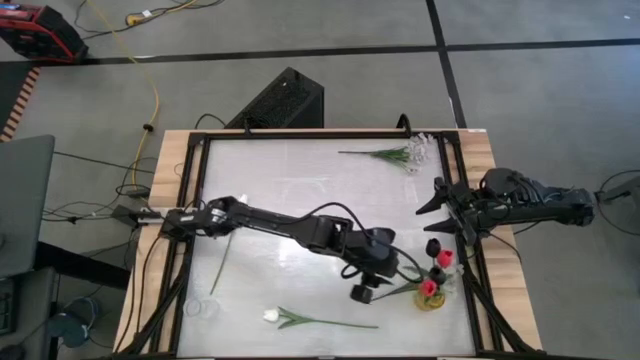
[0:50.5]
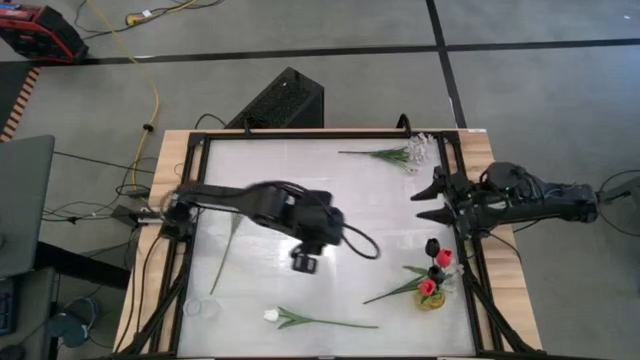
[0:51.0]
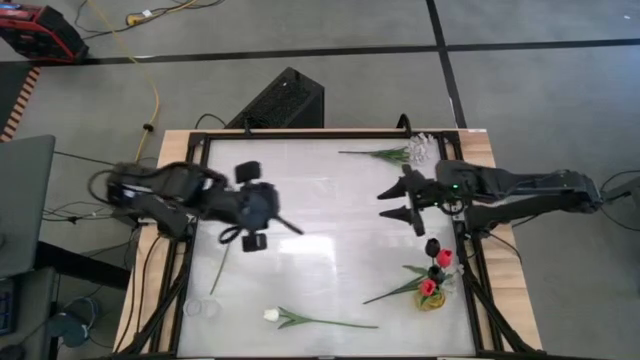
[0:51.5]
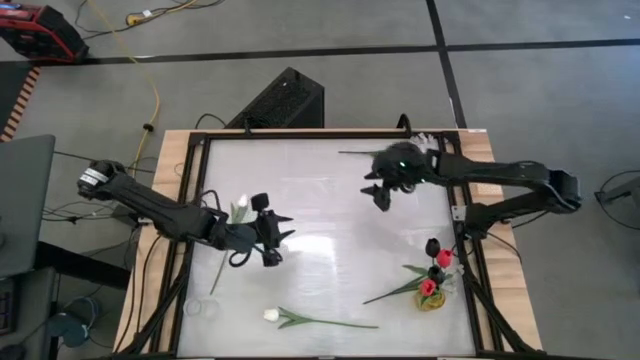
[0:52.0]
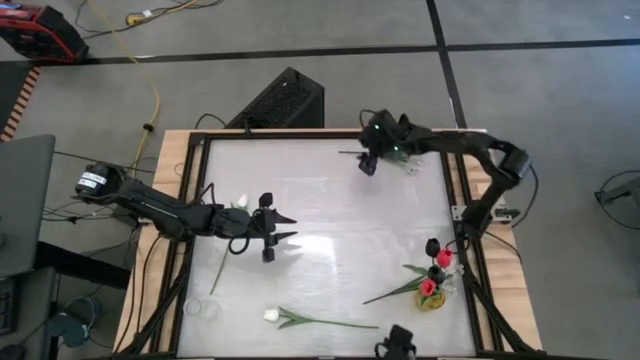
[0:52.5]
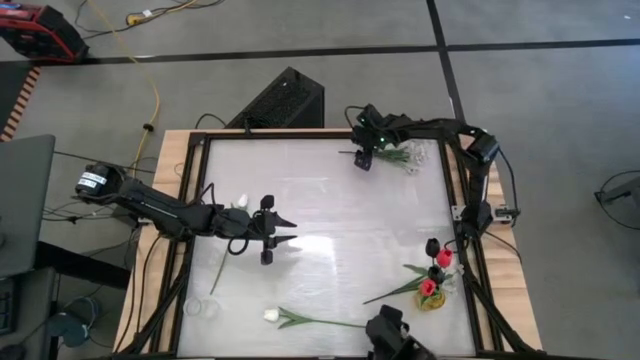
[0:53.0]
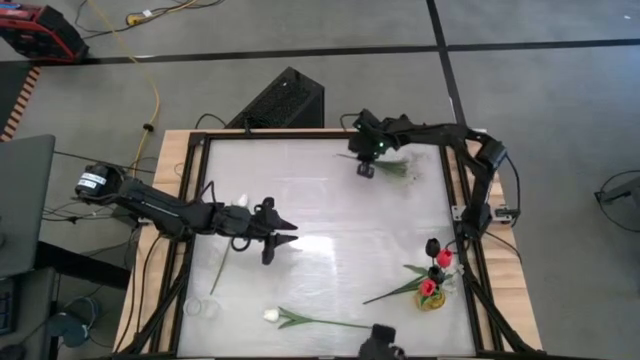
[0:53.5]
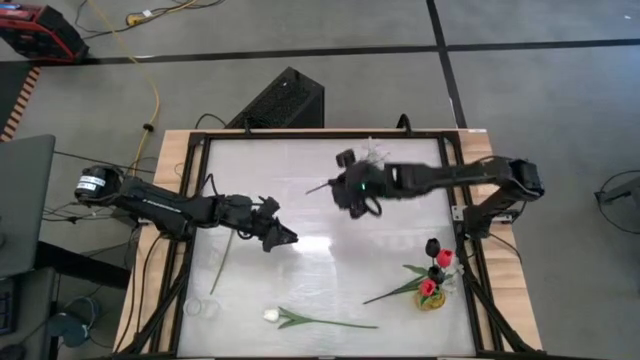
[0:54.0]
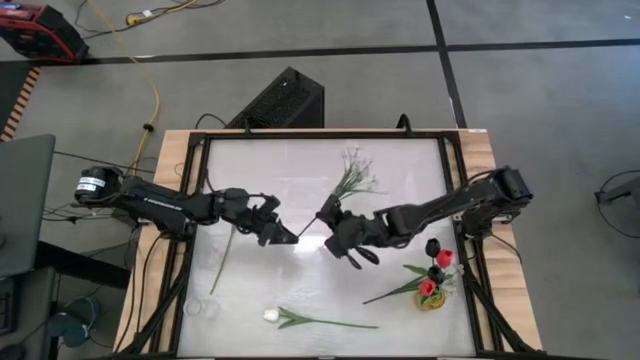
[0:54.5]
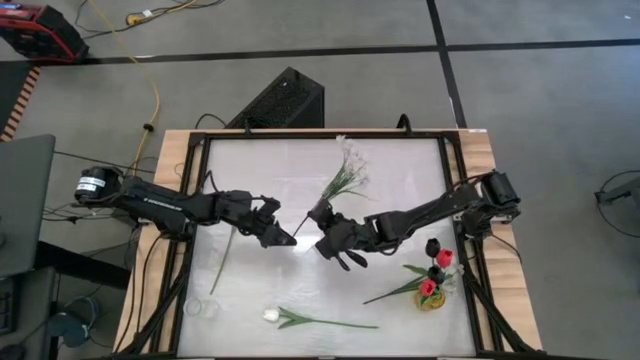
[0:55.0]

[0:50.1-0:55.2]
Task: Sort flowers into vase by color
Put the top white flowers into the transparent vase

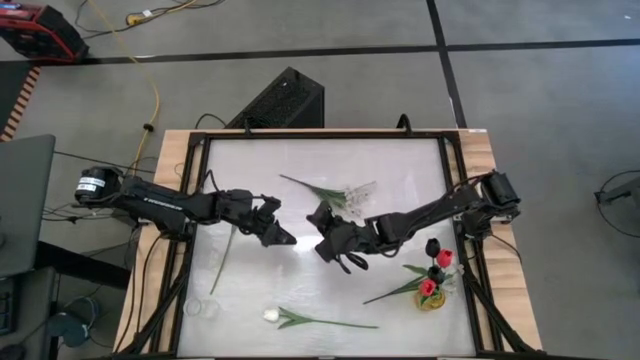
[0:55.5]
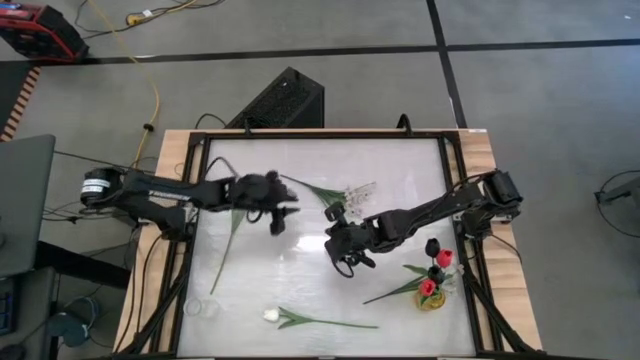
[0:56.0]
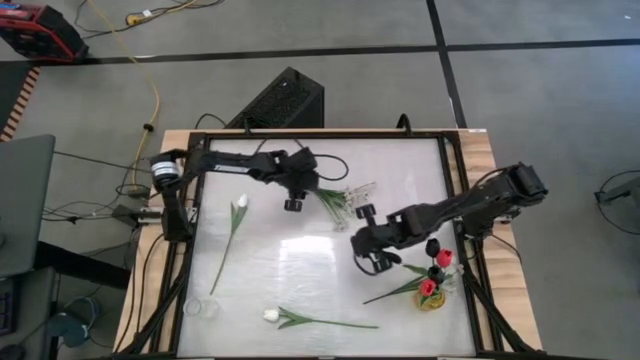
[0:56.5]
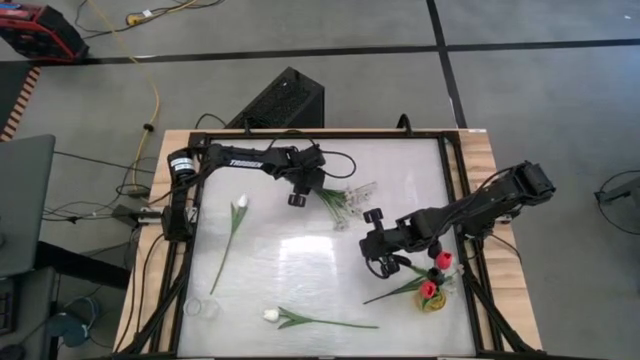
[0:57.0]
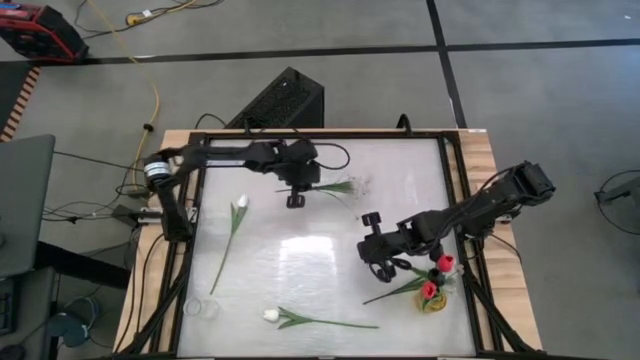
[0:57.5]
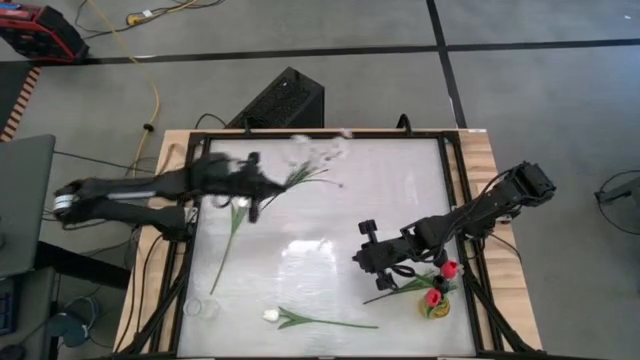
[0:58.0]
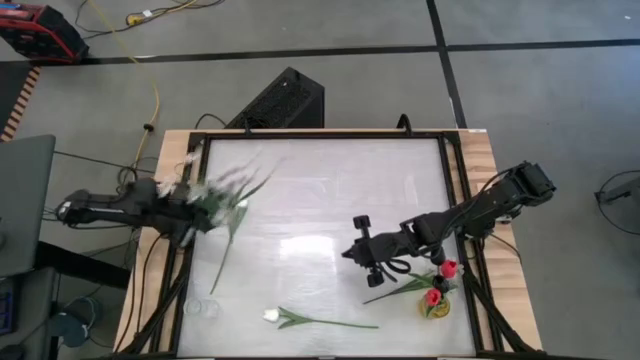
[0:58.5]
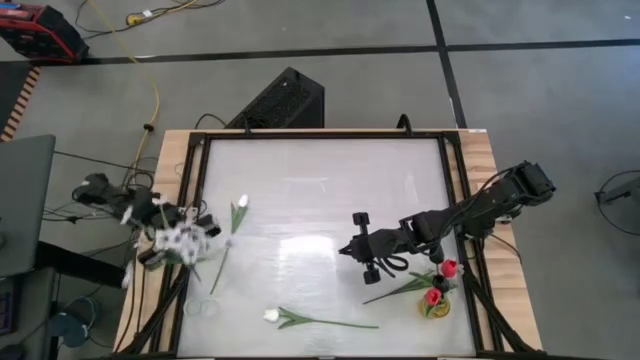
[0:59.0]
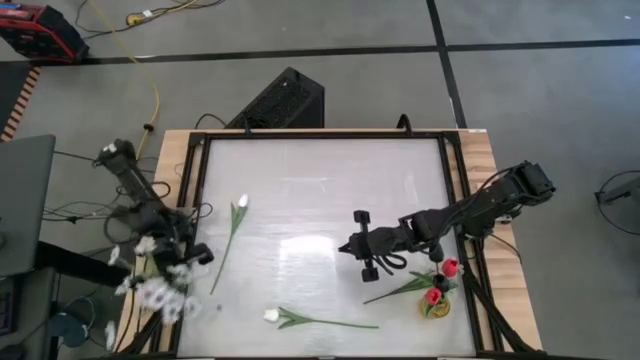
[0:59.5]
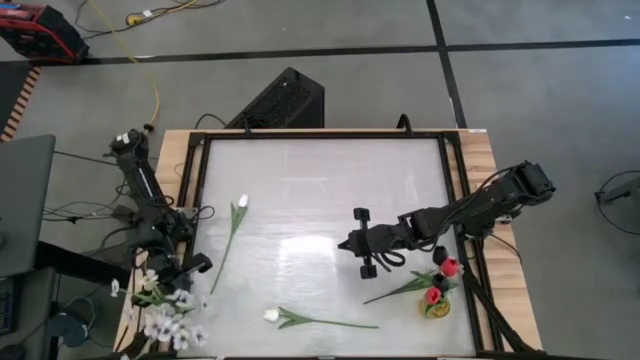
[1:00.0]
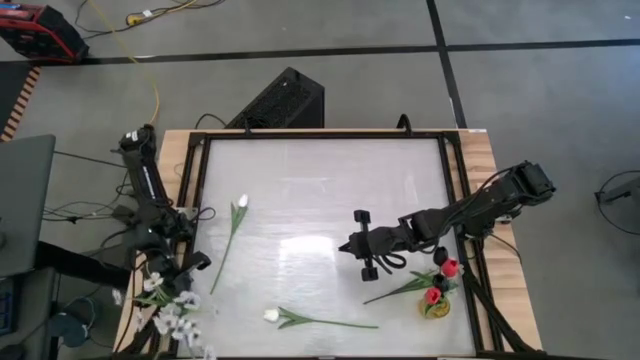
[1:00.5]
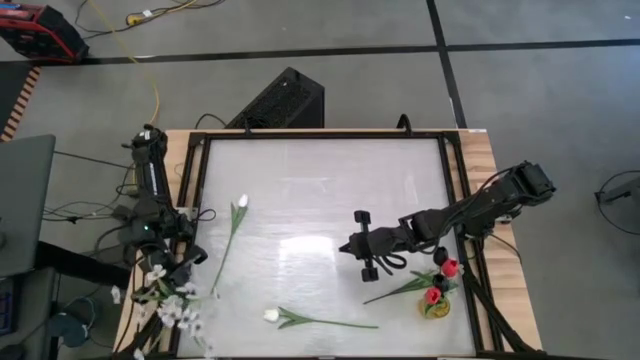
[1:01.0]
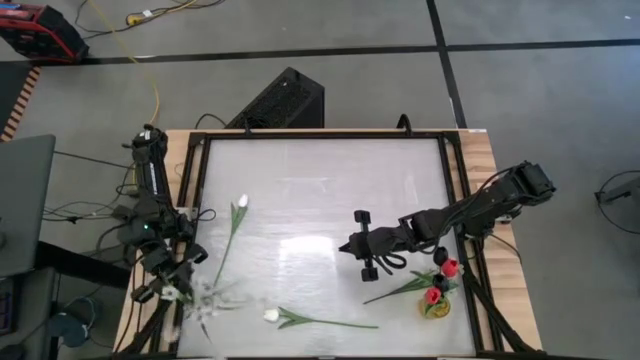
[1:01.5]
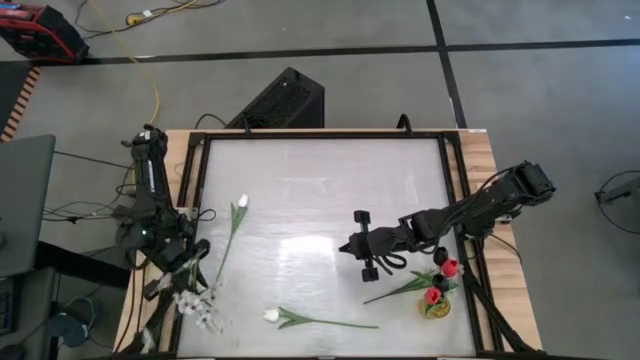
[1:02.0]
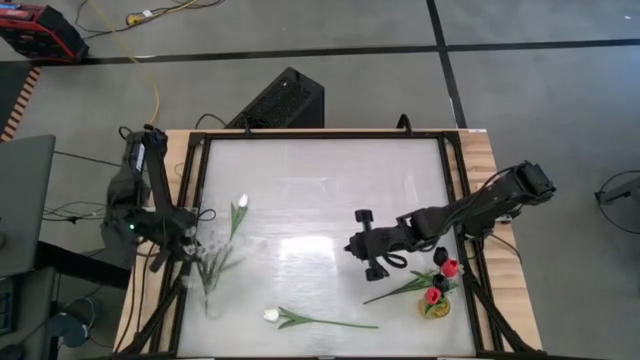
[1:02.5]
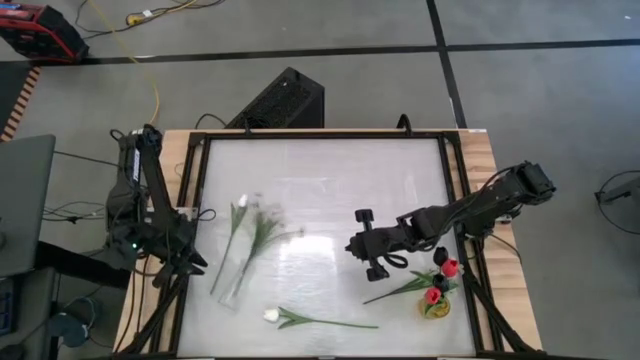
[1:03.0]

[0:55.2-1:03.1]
Put the top white flowers into the transparent vase

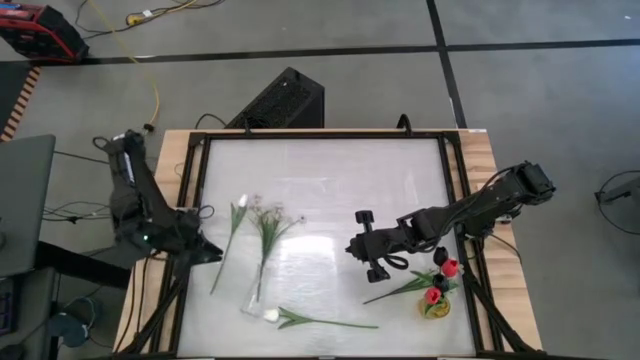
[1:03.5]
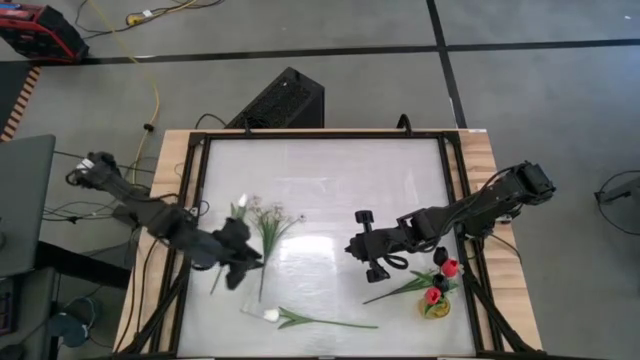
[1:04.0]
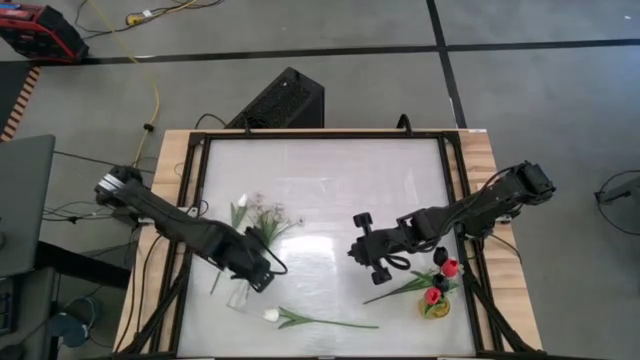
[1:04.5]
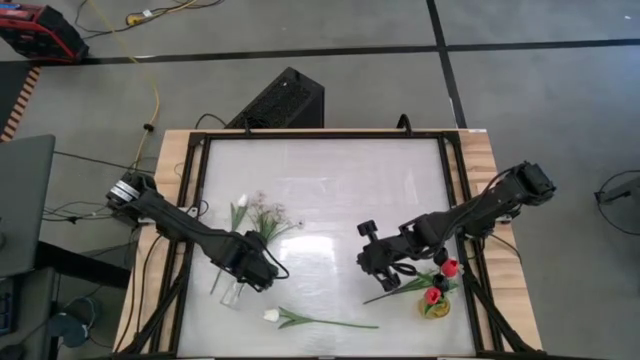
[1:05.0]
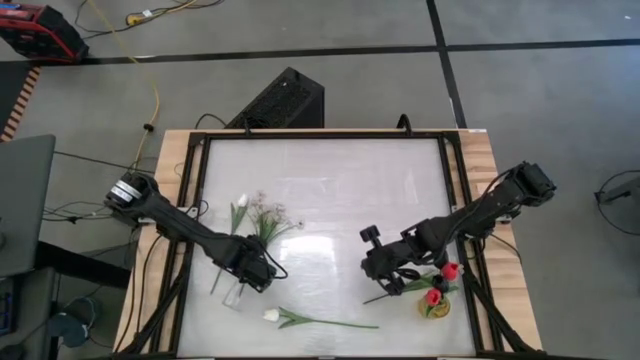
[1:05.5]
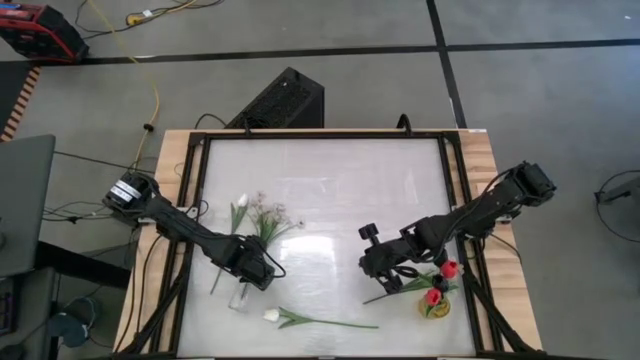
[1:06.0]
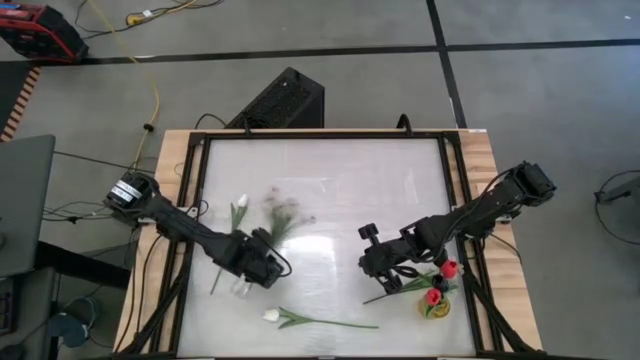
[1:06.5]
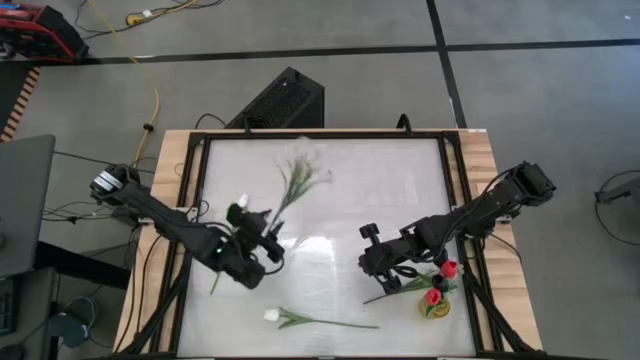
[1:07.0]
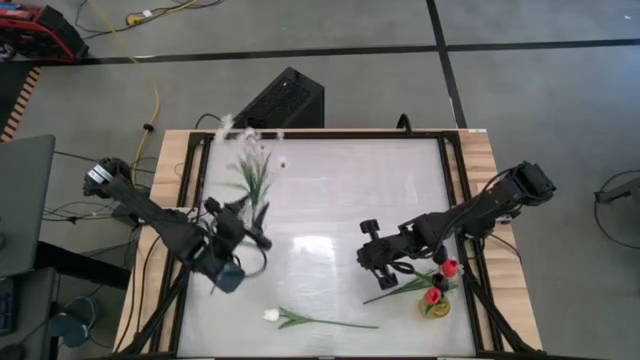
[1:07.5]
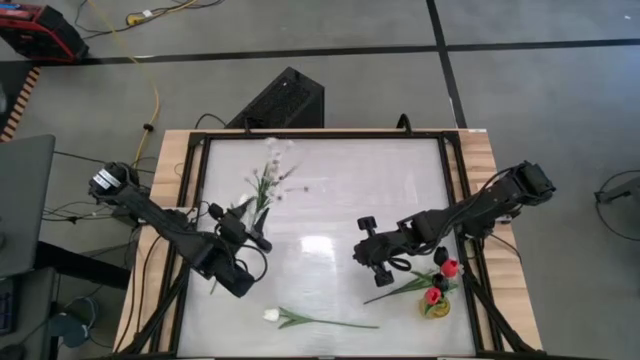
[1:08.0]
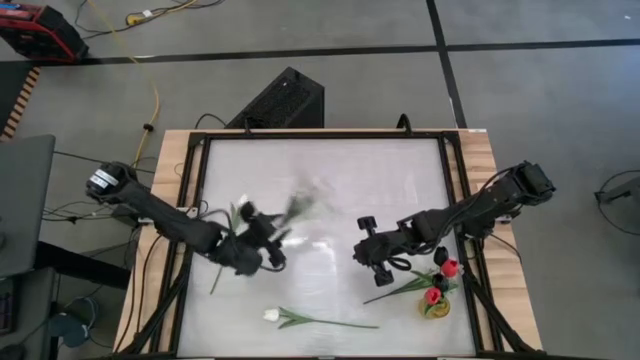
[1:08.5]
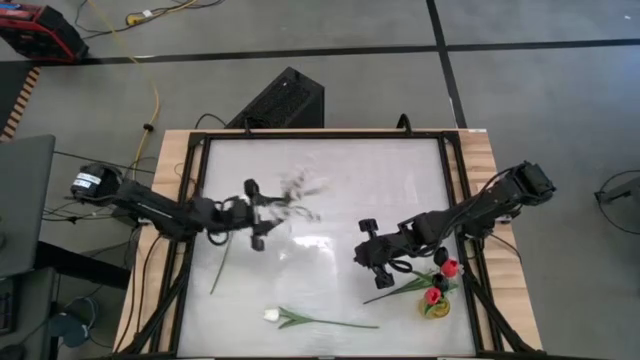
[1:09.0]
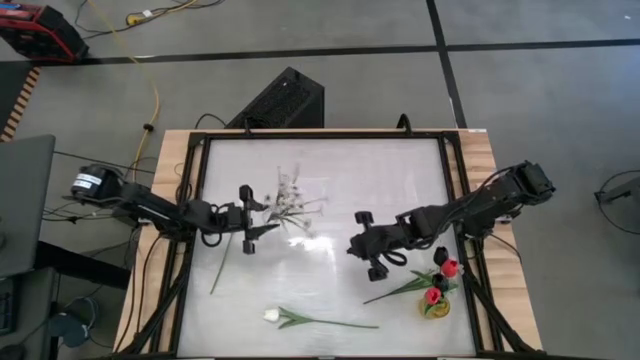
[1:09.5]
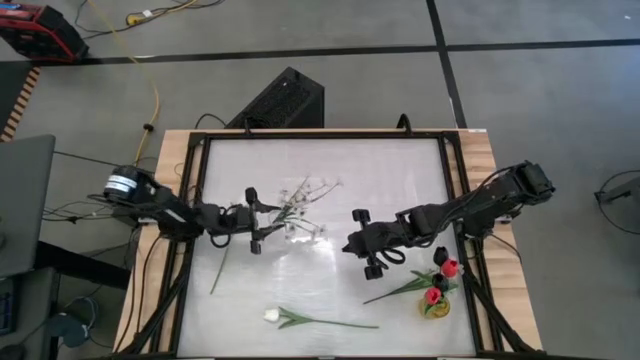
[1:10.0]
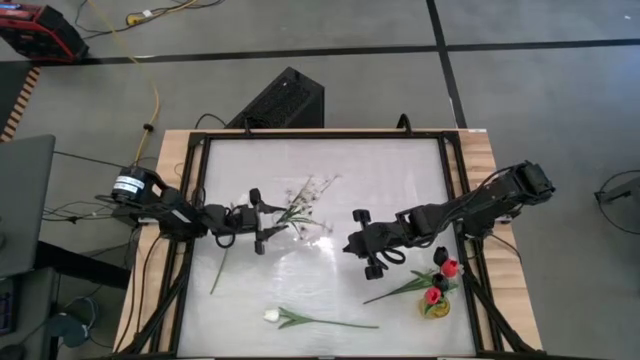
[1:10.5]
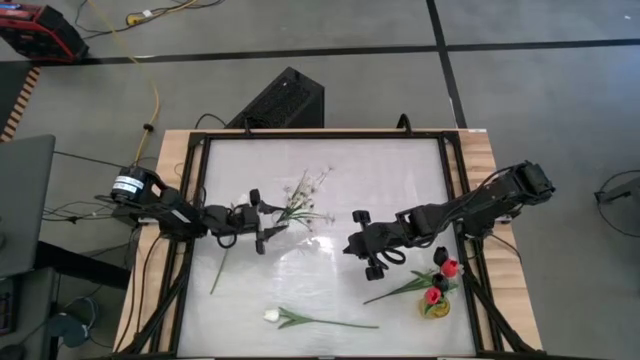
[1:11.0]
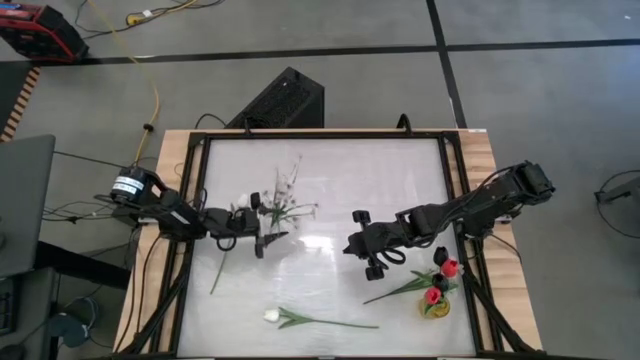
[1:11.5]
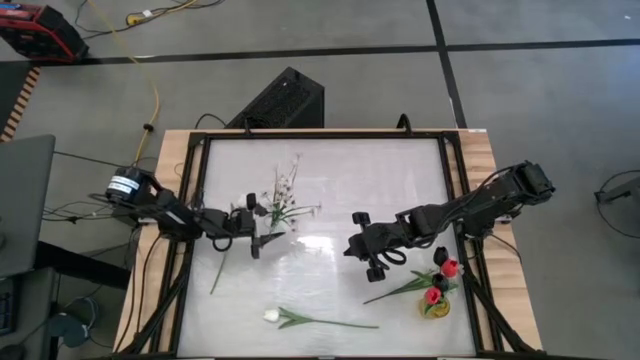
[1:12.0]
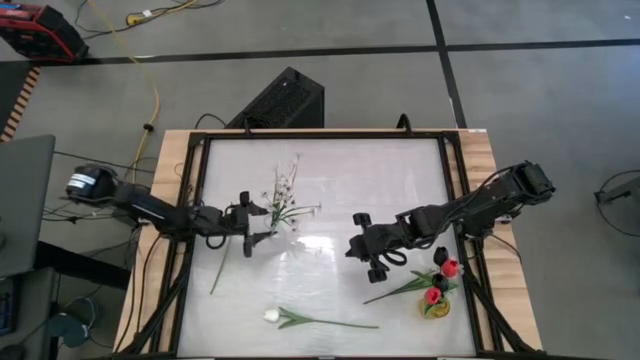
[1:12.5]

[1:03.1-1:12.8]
Adjust the transparent vase
